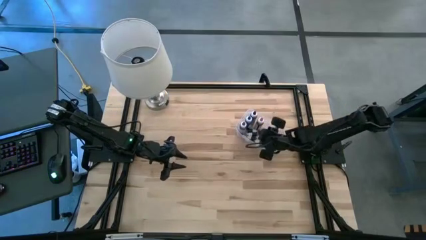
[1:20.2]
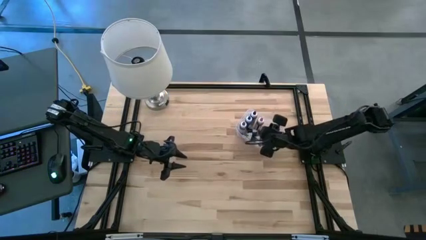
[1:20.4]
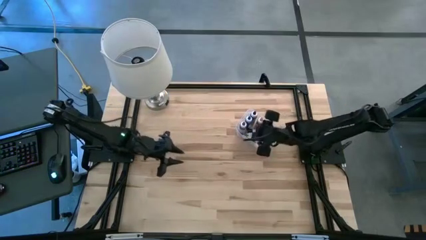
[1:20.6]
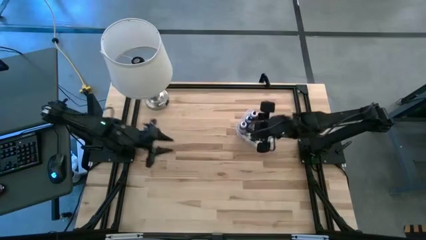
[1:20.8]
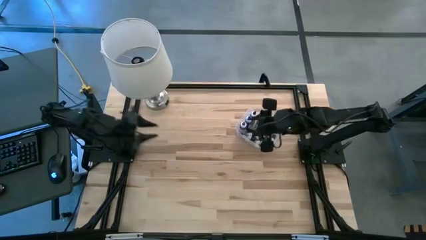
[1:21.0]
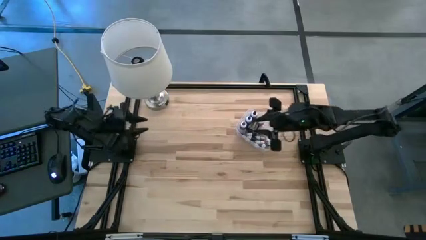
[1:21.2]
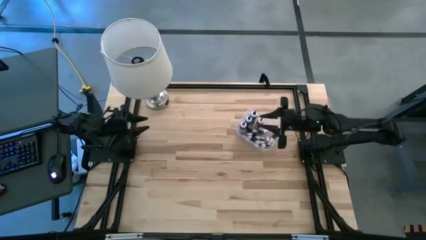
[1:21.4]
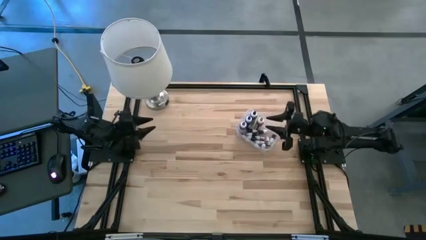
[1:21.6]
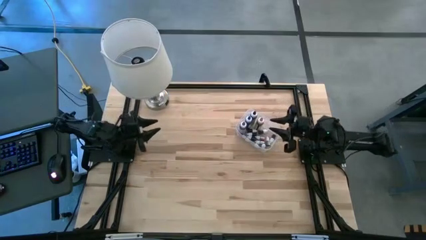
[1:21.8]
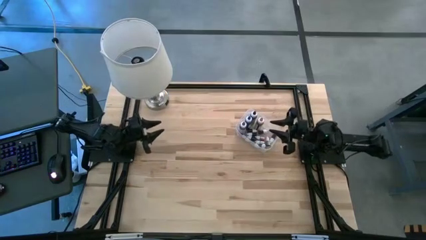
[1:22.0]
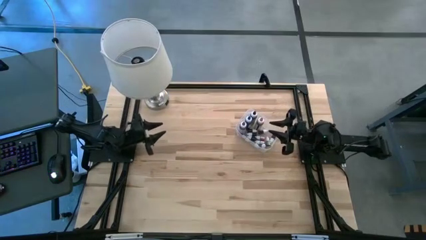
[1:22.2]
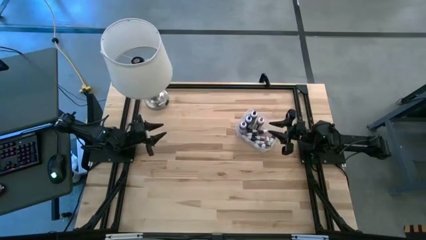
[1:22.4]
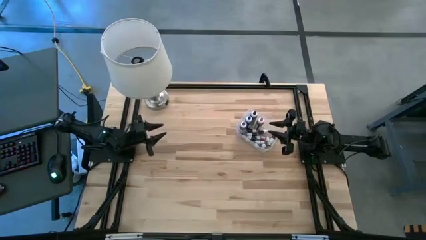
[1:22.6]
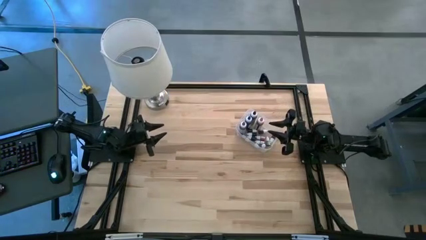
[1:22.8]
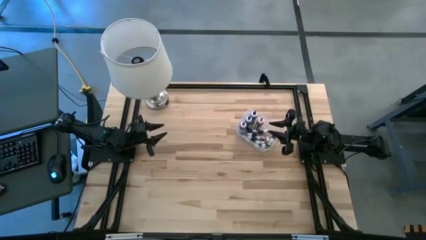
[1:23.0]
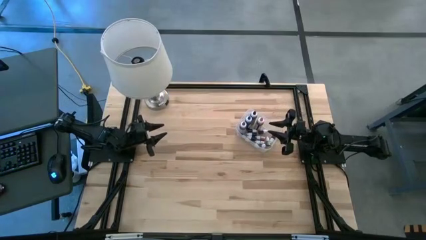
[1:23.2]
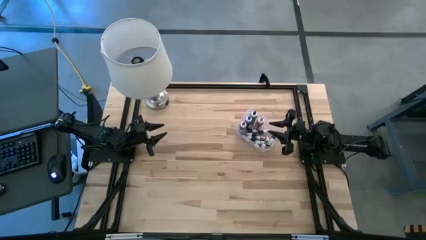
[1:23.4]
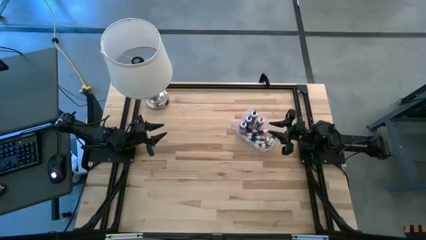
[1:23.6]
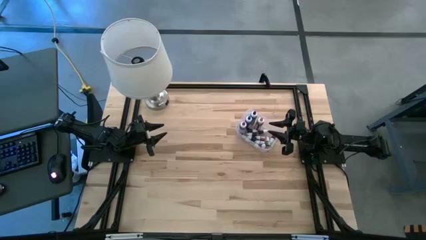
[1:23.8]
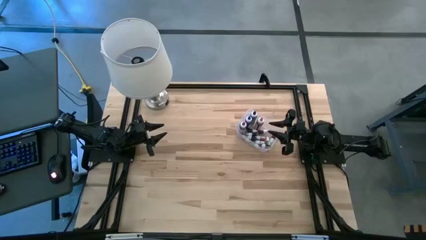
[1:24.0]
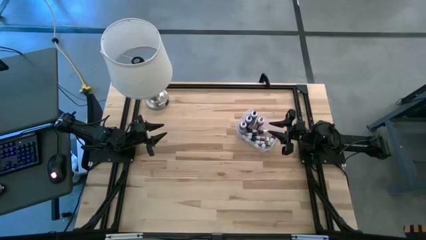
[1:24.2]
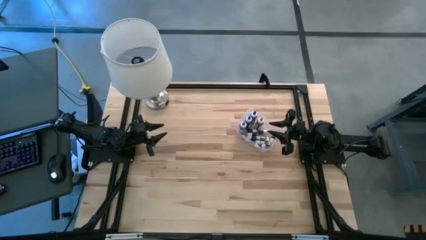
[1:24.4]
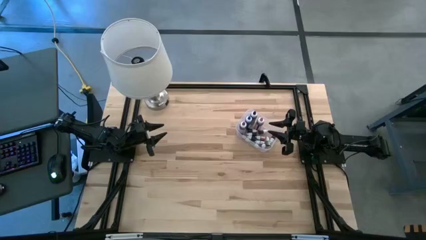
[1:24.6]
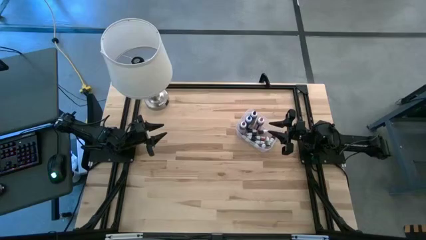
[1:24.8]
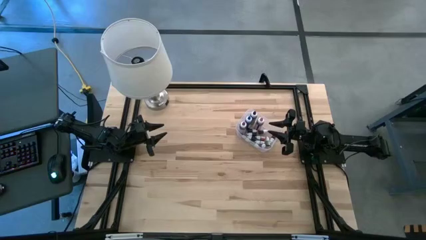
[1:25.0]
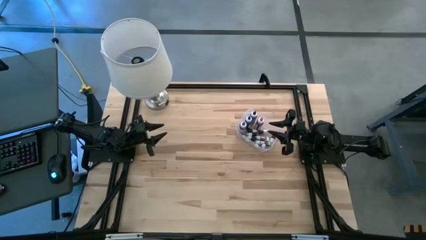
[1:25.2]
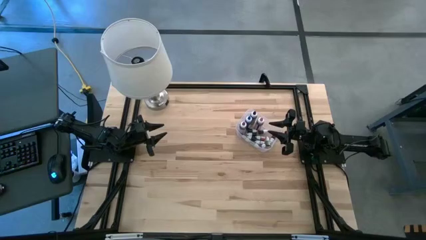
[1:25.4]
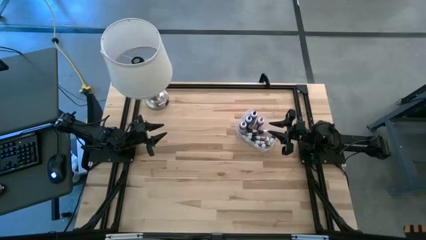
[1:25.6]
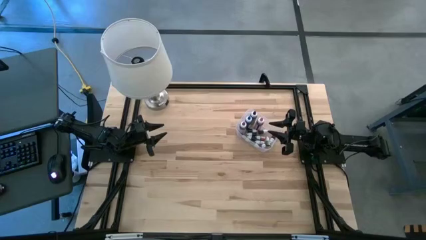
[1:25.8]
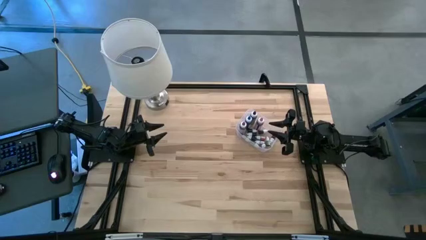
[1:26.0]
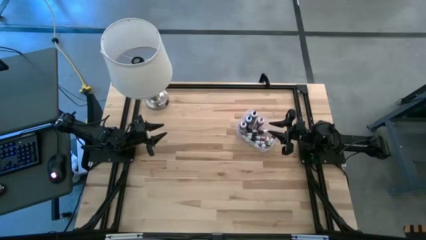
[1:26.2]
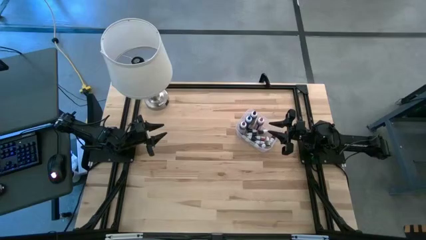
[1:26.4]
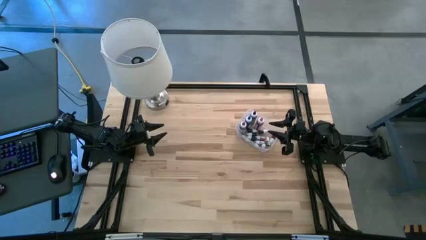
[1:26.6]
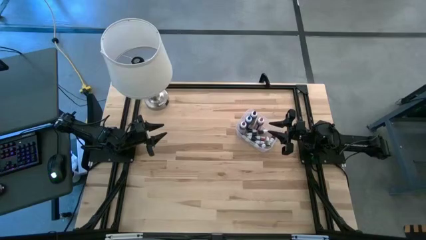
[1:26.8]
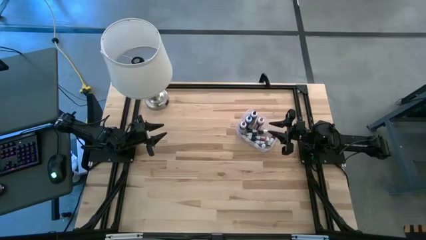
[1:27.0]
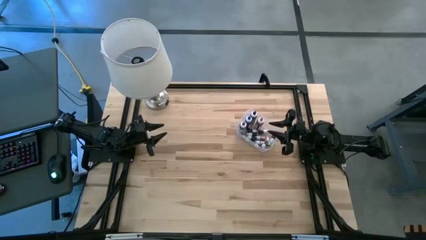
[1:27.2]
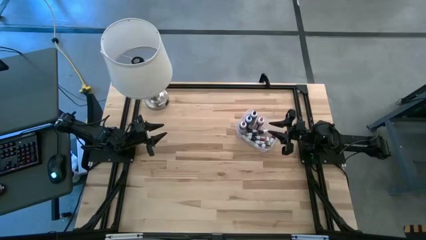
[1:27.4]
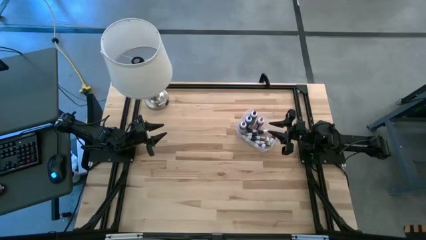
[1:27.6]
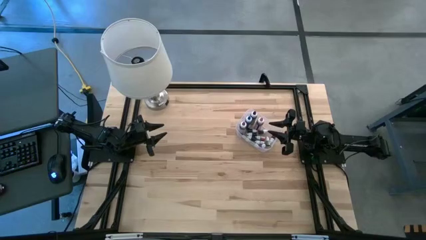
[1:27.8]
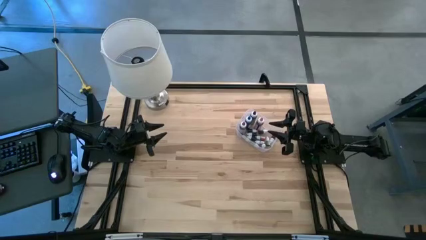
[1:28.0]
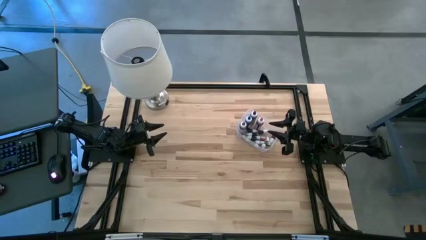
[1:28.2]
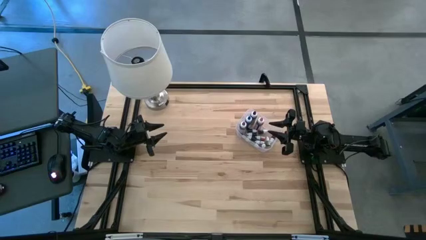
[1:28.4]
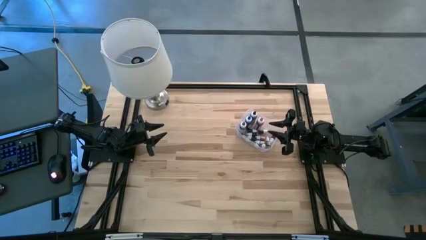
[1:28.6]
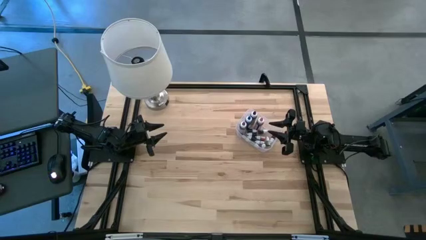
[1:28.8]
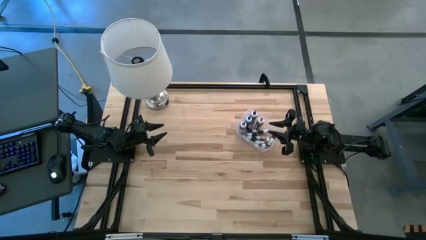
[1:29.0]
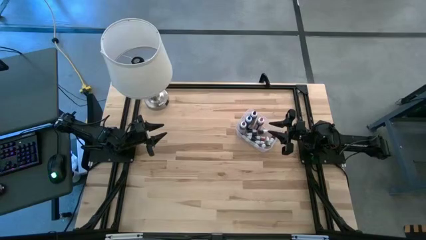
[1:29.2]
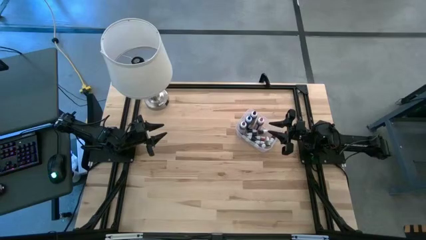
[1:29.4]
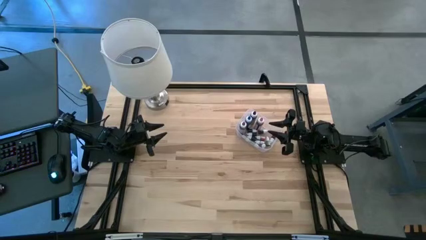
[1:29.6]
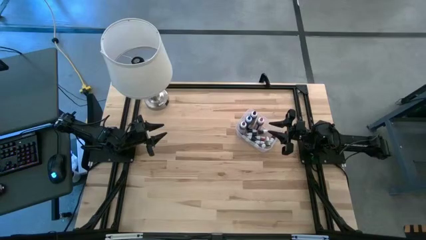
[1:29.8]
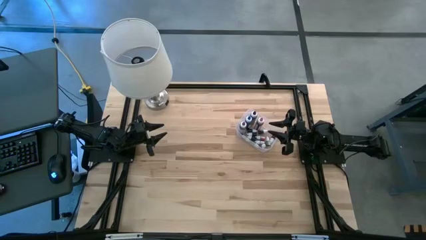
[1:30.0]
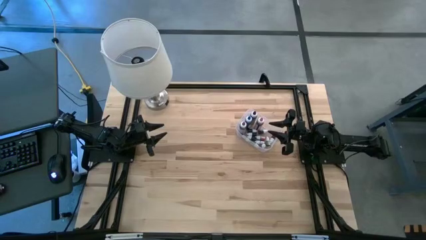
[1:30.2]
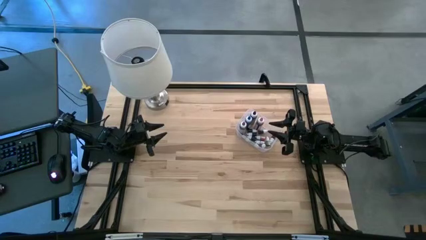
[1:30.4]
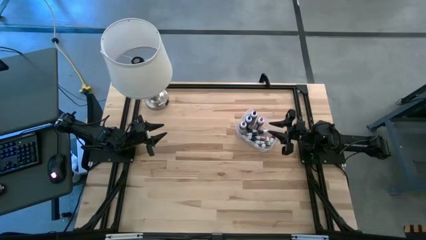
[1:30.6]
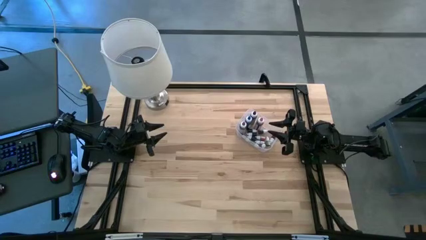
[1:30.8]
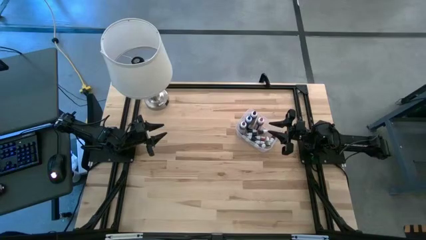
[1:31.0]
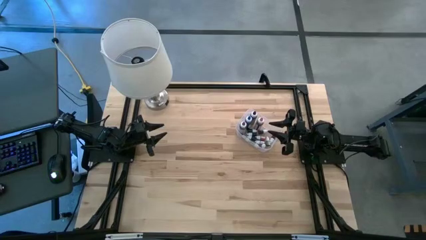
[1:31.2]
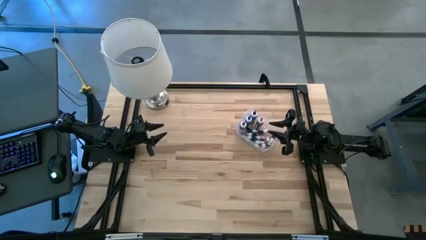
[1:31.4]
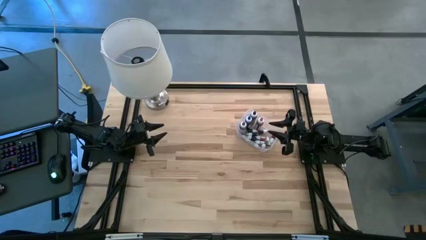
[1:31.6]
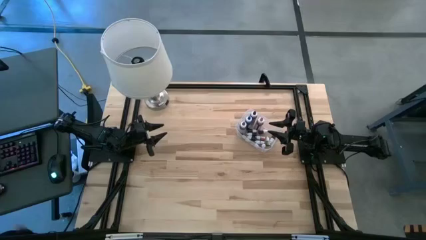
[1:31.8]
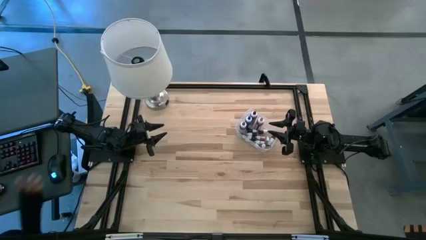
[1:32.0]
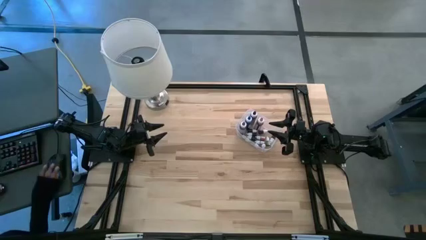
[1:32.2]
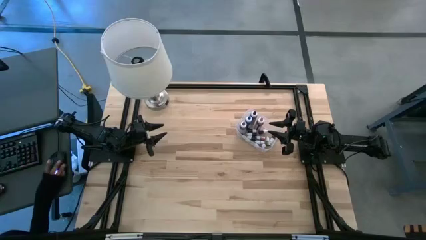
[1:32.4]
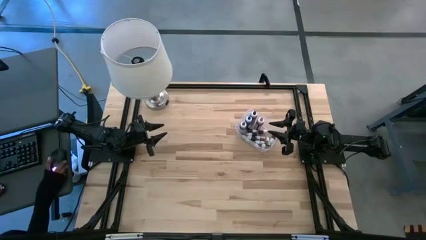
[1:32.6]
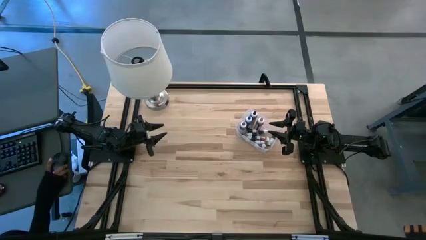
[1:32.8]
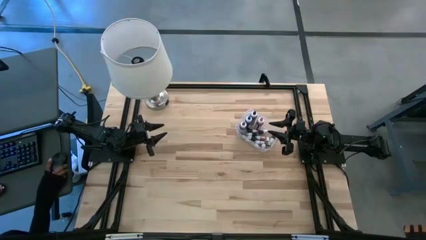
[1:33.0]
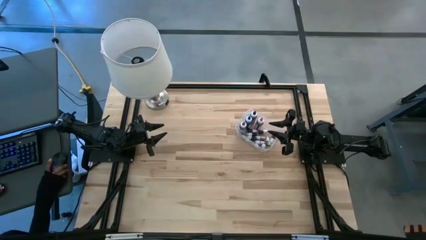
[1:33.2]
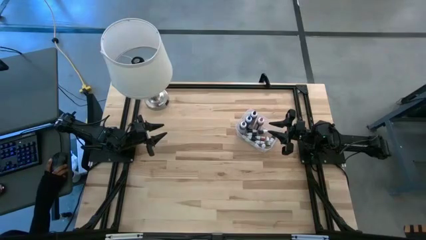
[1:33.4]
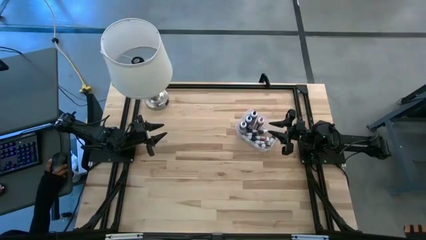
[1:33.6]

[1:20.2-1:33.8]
Task: Pick & Place food coloring
Return to Home Position

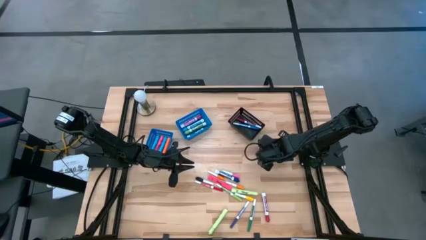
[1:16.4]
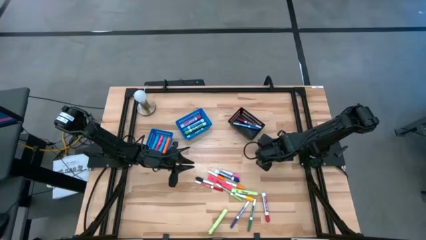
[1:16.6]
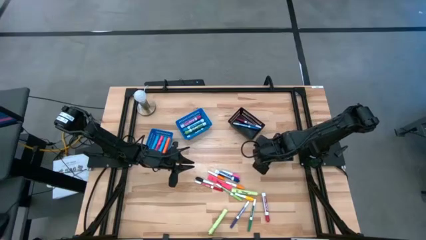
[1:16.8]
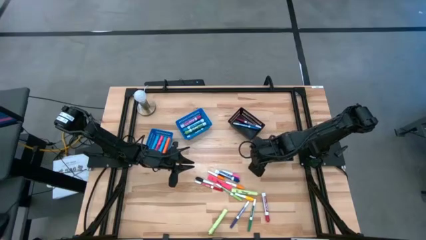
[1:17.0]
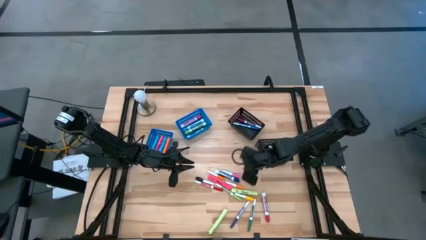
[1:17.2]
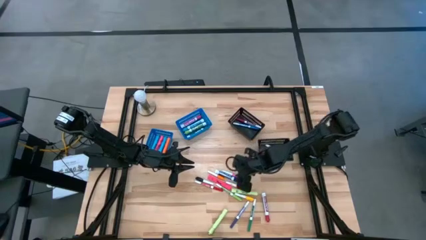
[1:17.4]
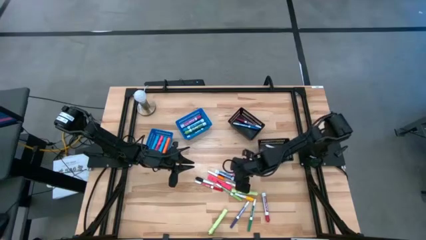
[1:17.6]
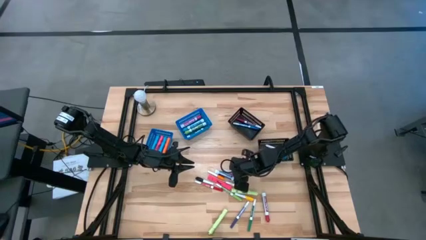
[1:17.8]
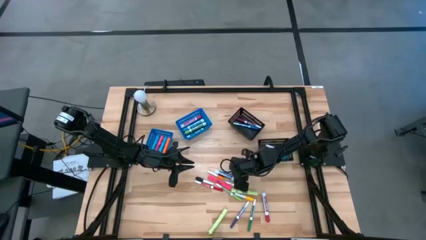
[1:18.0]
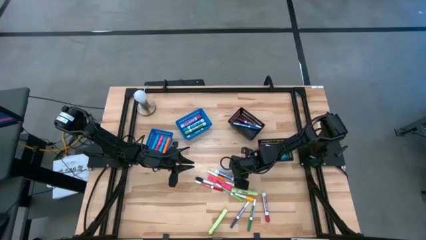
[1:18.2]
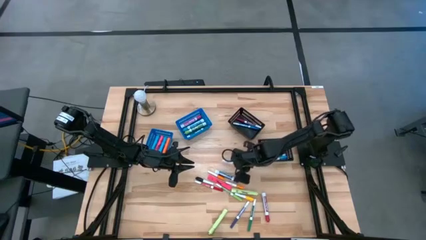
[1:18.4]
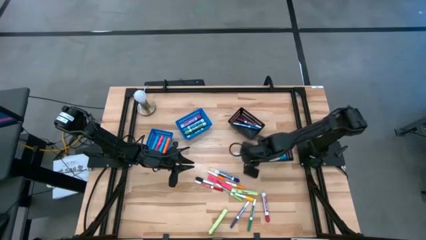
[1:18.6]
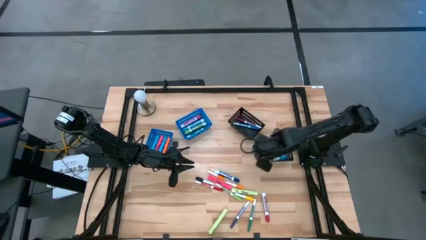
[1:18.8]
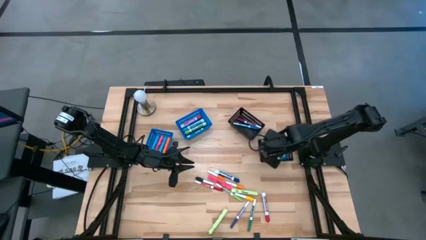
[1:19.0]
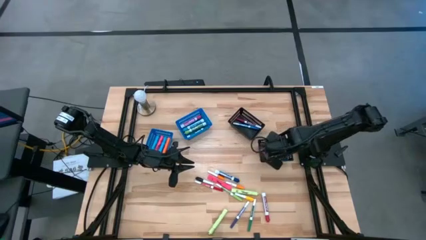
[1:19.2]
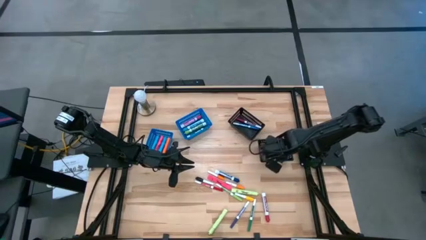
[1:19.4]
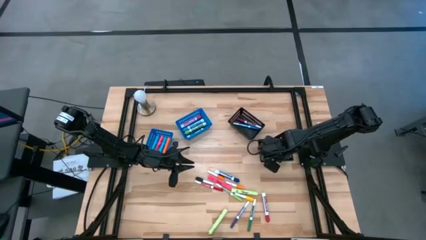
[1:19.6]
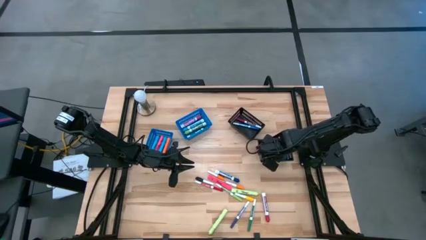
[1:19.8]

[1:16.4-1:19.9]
Task: Pick & Place Markers
Put the pink highlighter pen into the bottom black bin
